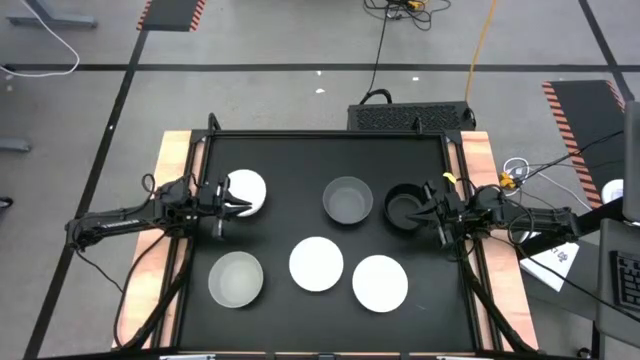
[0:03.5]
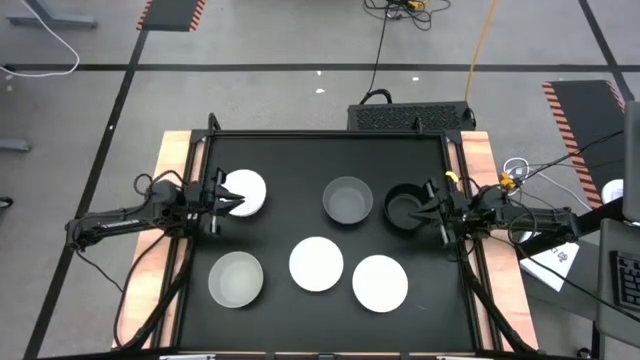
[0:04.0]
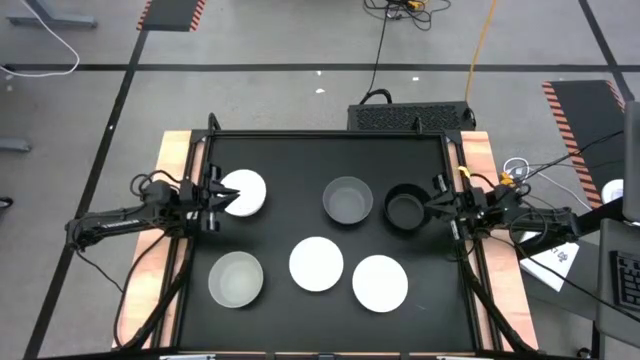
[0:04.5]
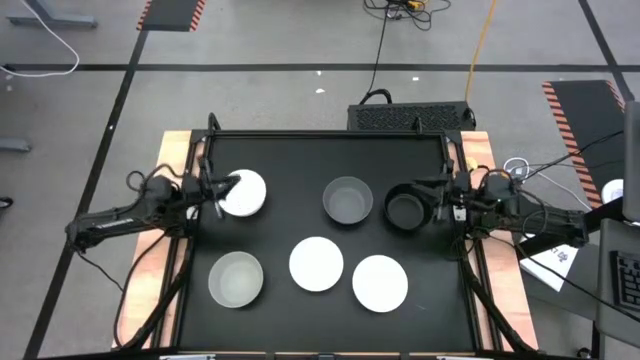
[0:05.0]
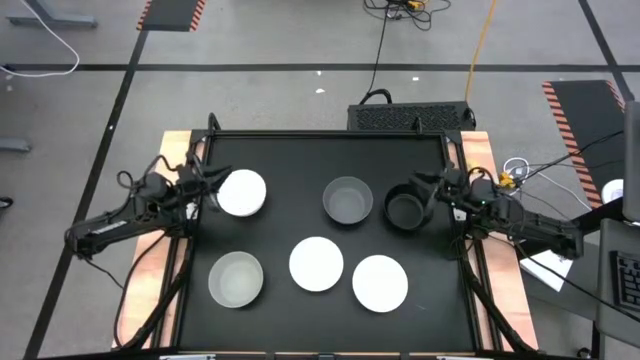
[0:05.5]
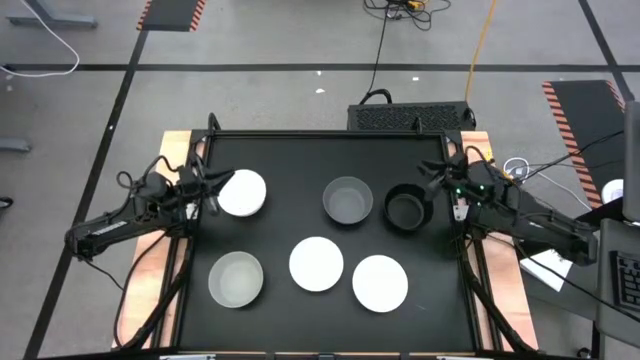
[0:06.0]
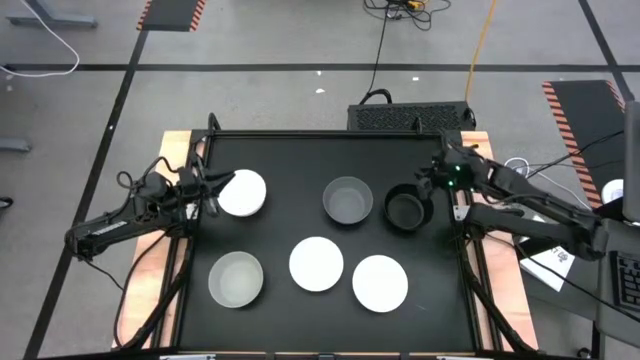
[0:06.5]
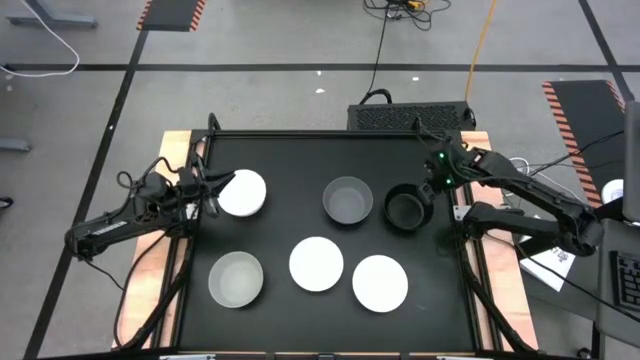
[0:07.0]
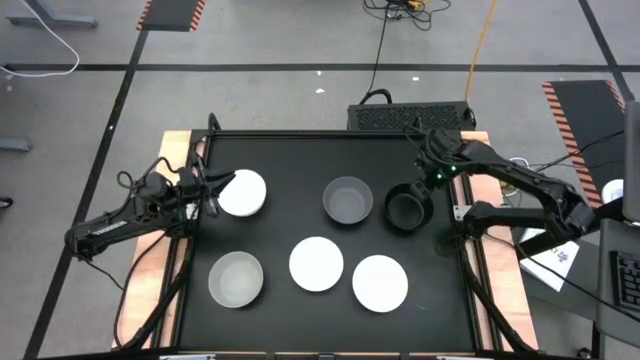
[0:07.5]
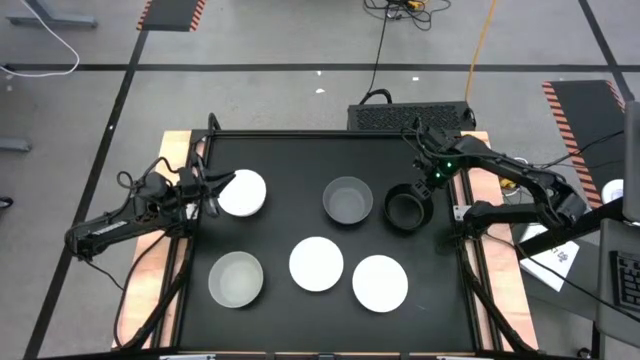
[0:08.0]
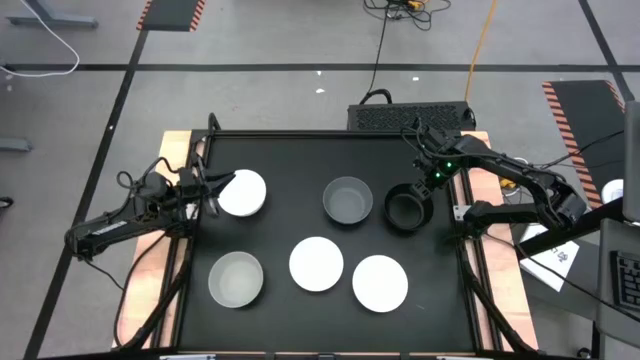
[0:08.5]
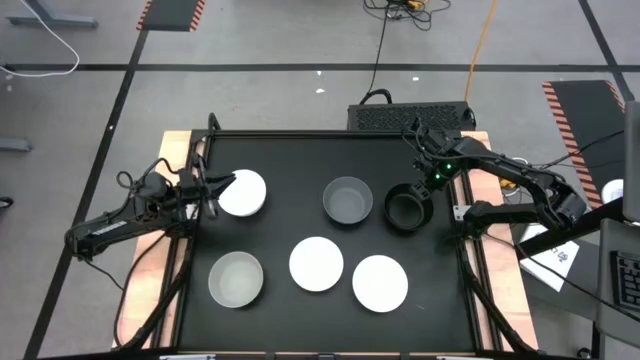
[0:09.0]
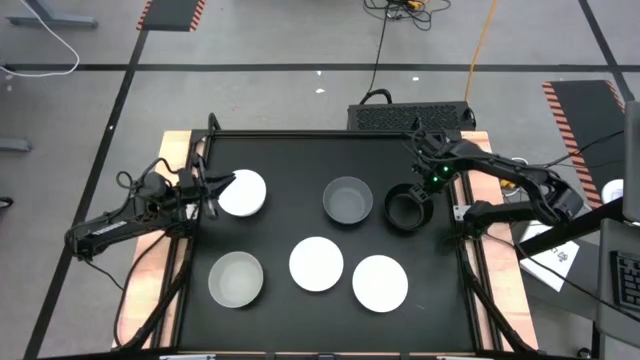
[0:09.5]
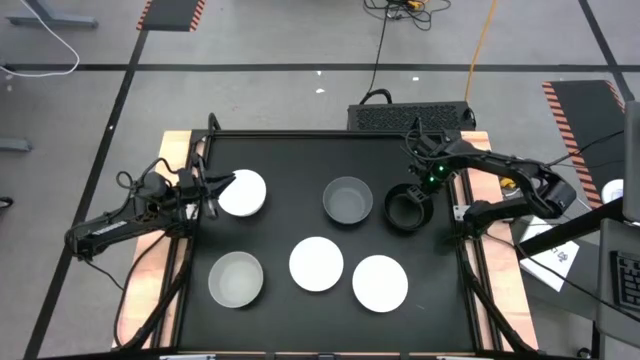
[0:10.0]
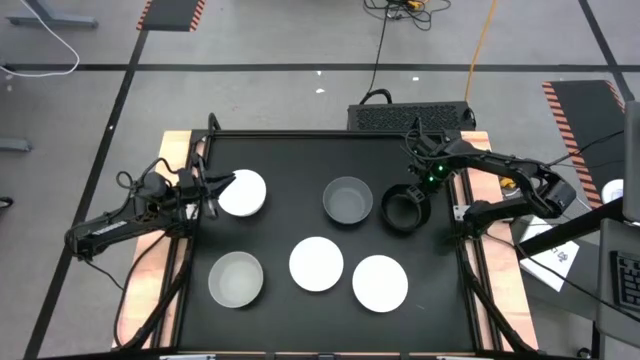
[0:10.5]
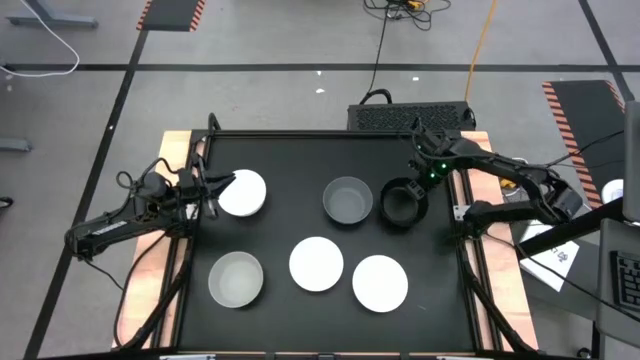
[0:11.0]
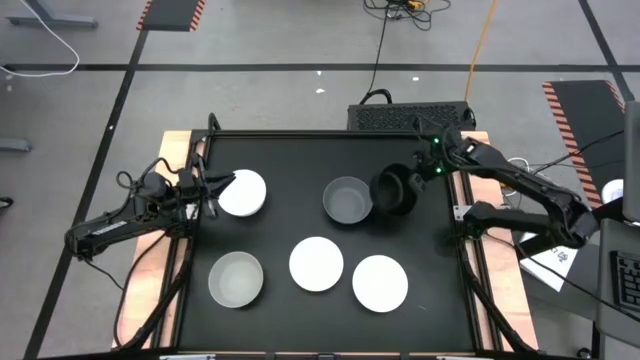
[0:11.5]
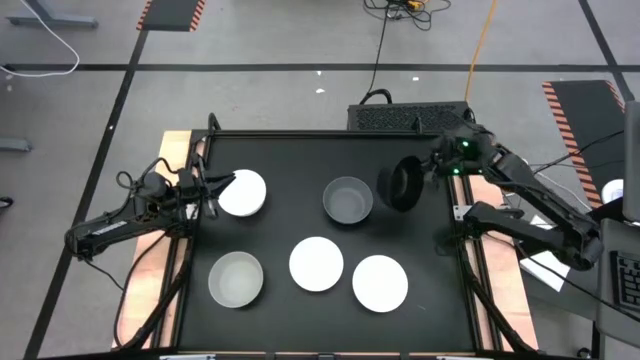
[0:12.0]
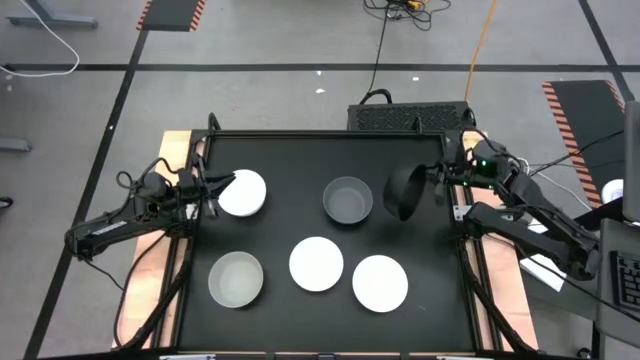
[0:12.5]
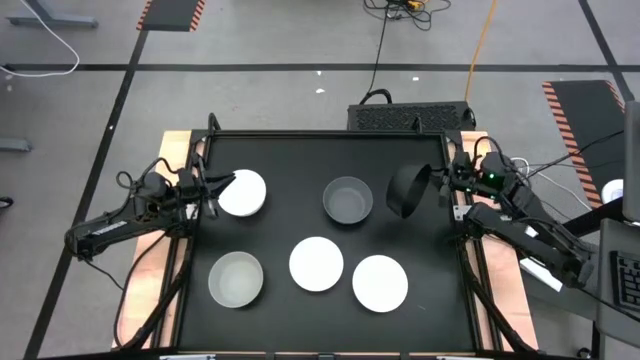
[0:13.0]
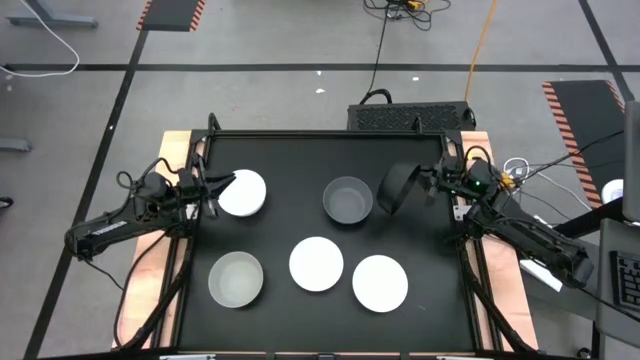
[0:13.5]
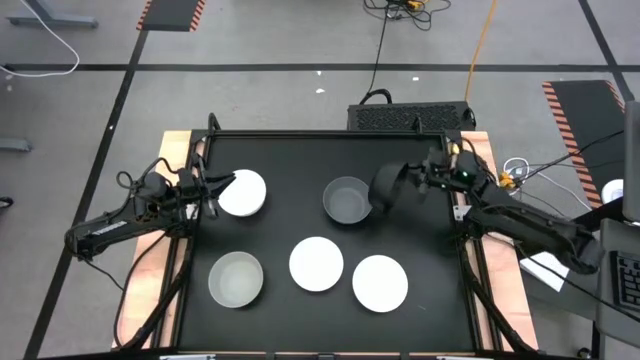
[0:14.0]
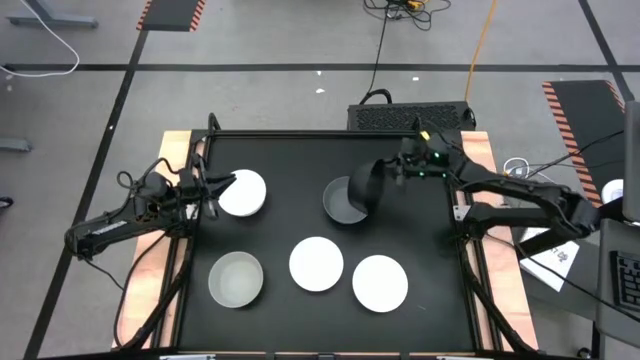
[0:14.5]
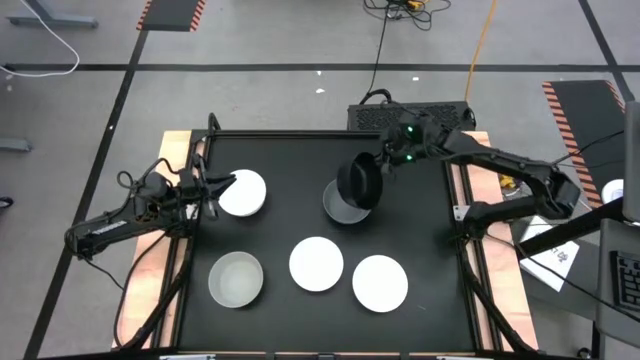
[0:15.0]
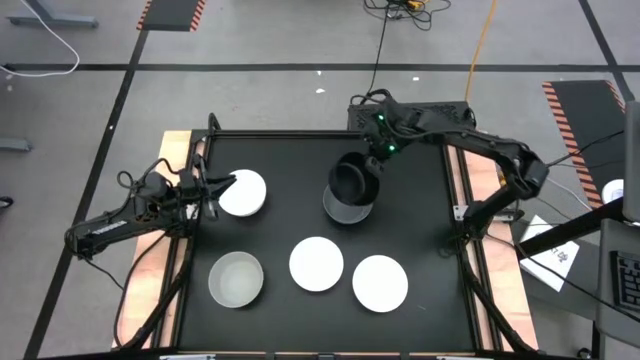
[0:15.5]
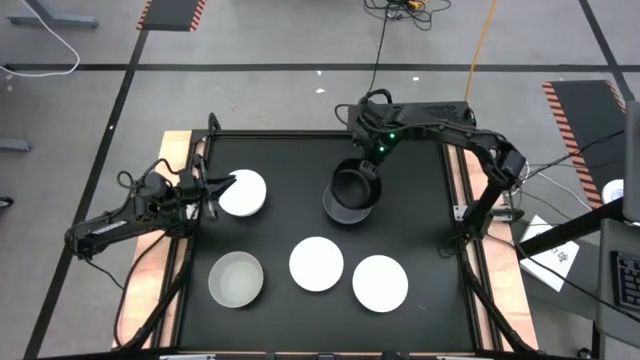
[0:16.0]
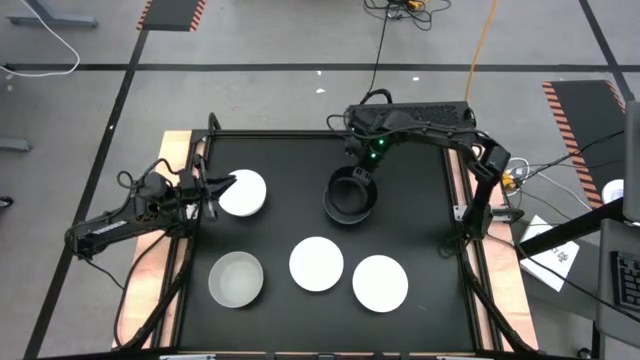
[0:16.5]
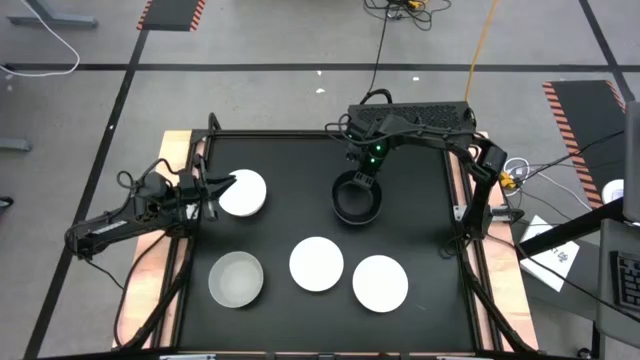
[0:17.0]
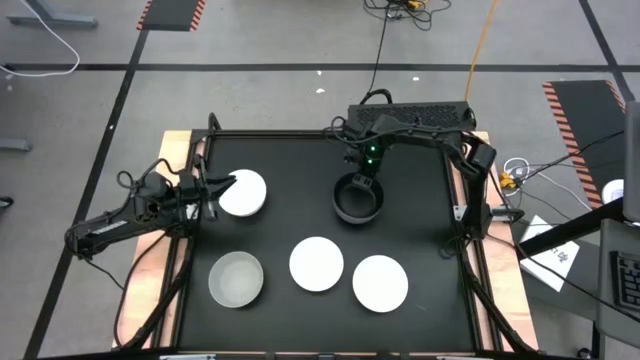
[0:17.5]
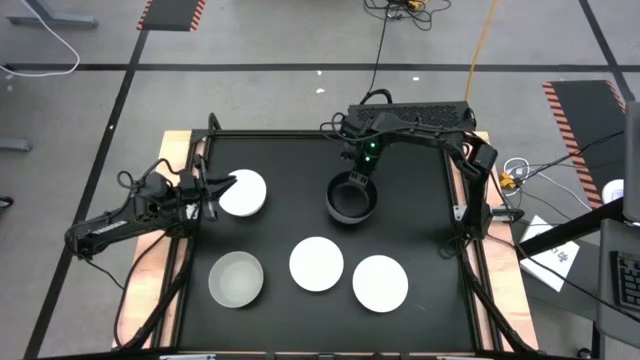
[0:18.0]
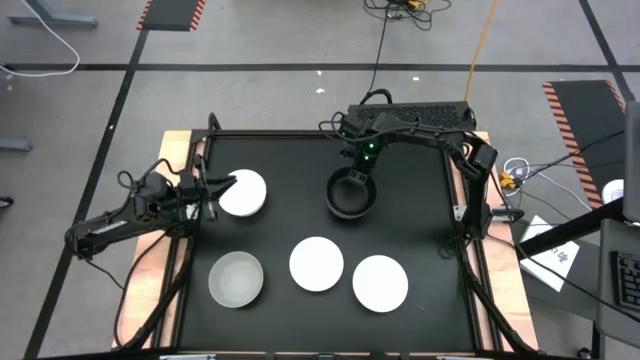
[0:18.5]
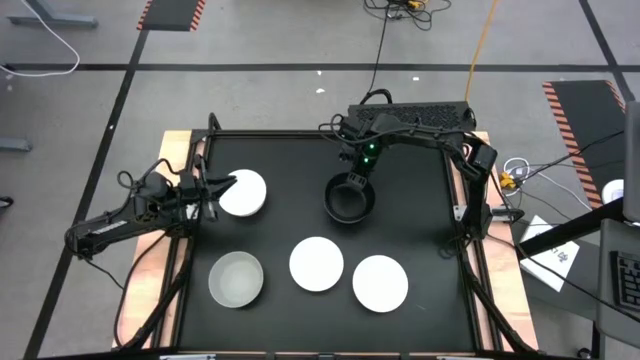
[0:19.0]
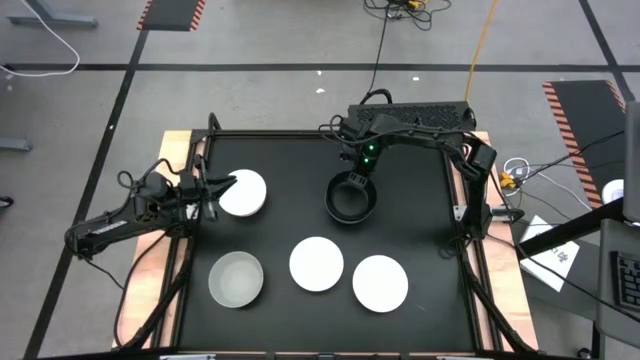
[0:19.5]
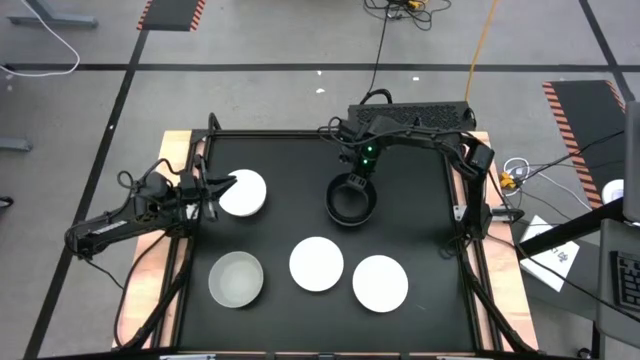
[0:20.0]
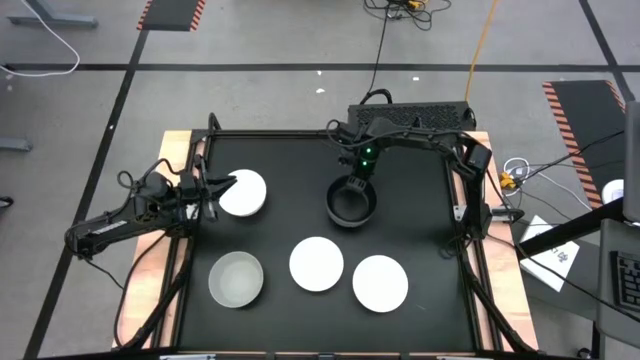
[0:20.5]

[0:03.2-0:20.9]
Task: Nest bowls inside each other
Stack the black bowl on the top gray bowl

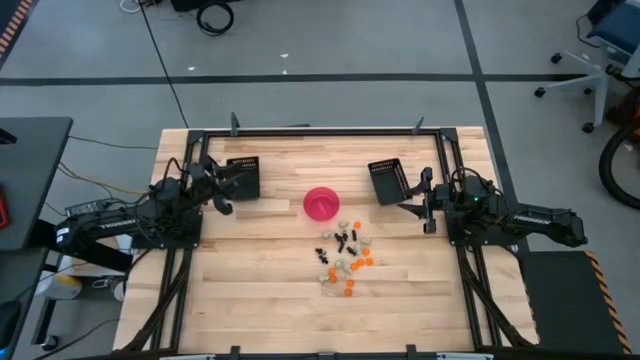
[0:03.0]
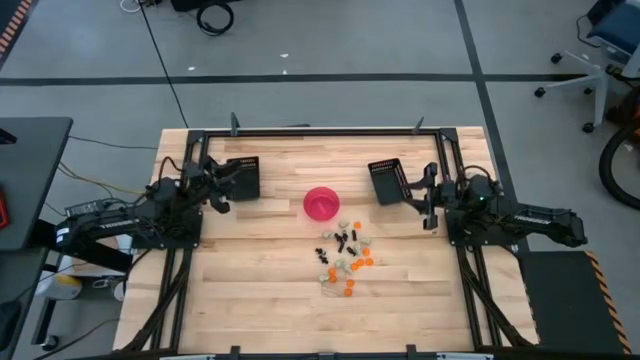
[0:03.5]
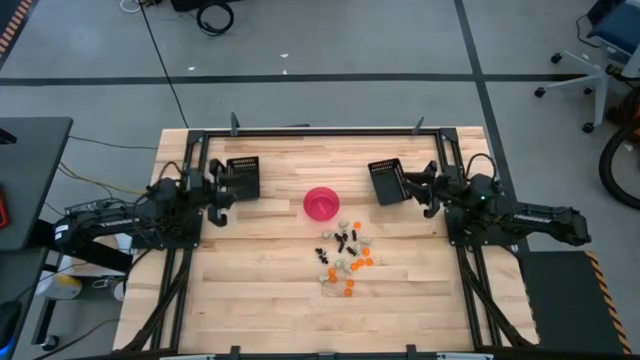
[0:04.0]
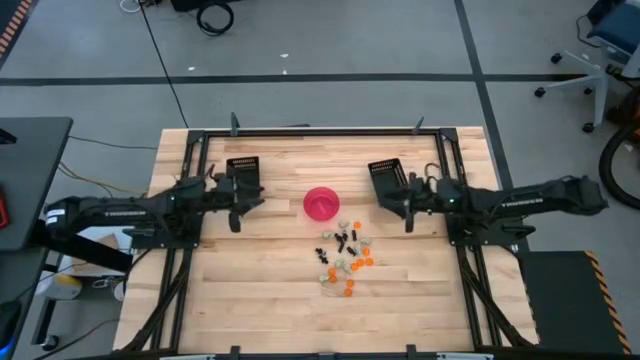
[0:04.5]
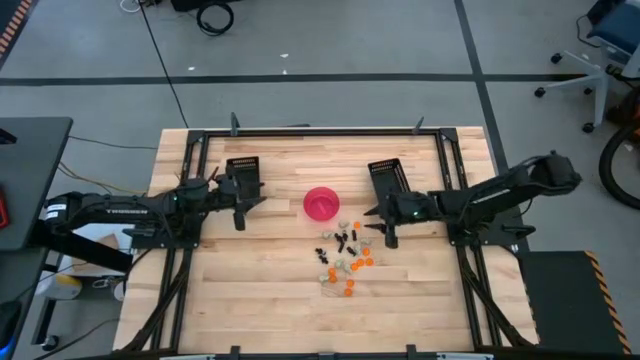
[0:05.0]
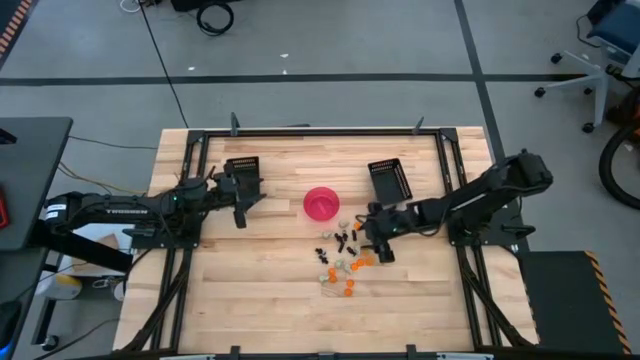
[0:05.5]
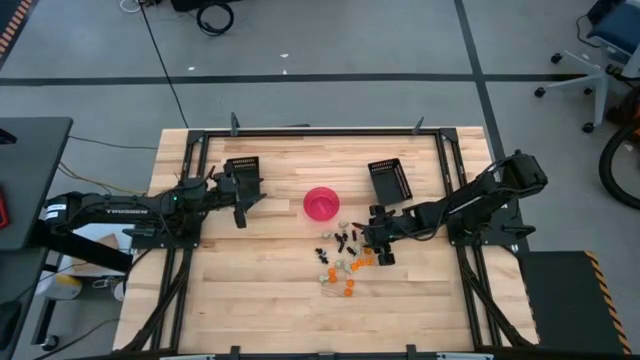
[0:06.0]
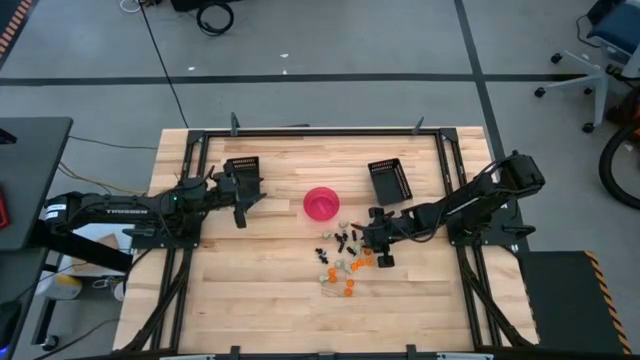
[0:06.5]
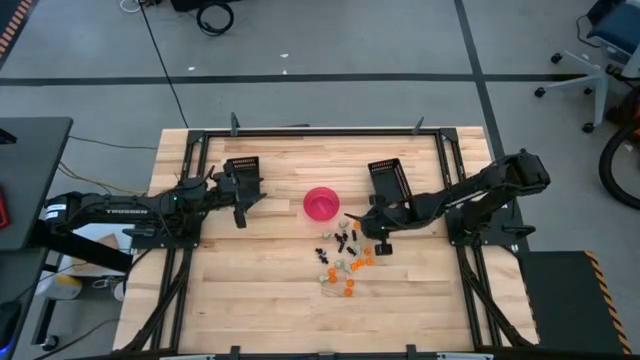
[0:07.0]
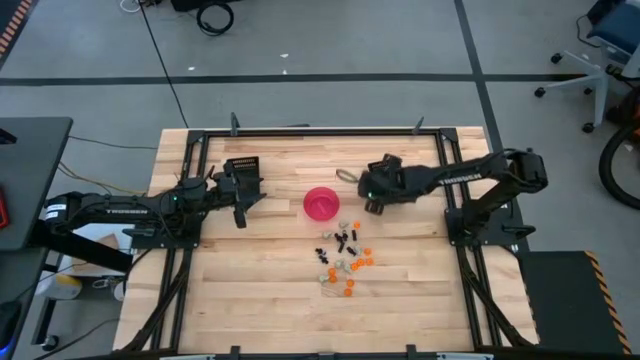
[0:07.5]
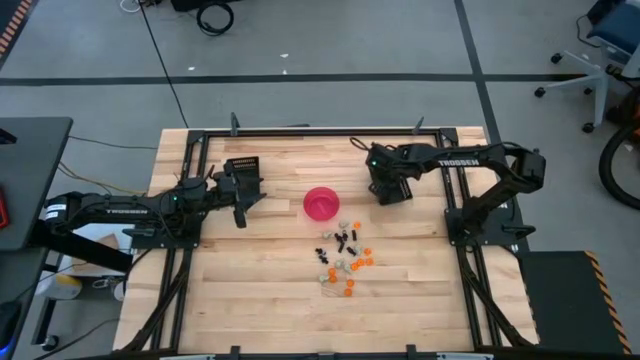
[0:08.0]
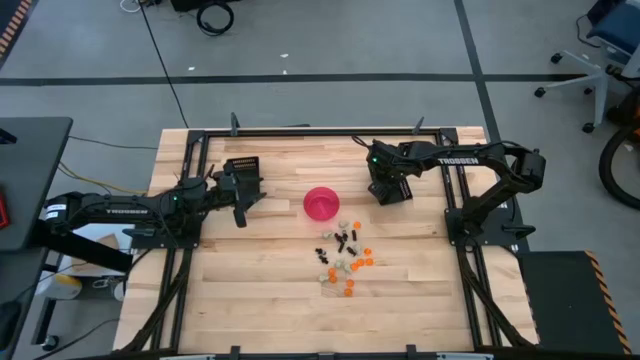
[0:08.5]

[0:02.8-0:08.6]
Task: Sort Halloween decoration
Put the white skull toy into the right black bin
